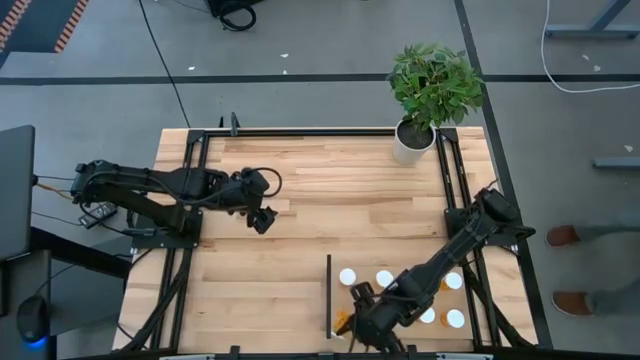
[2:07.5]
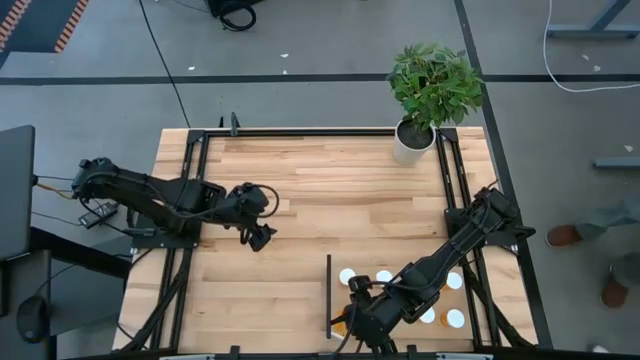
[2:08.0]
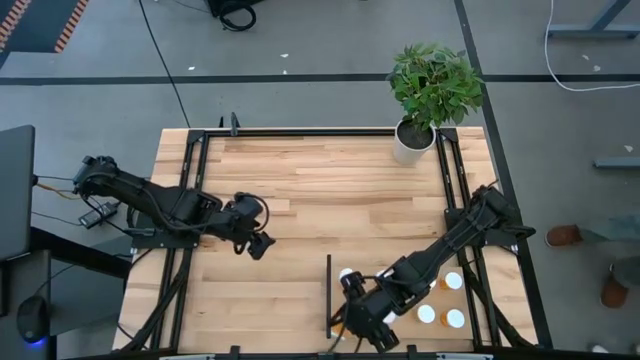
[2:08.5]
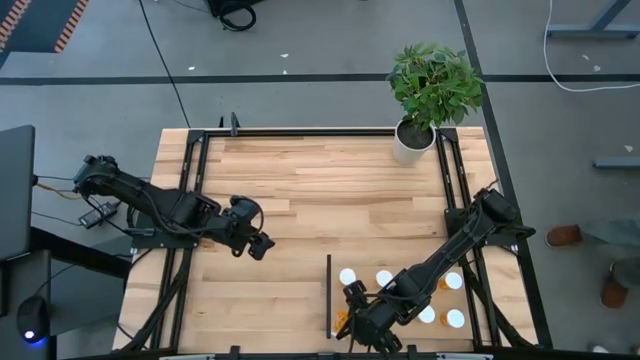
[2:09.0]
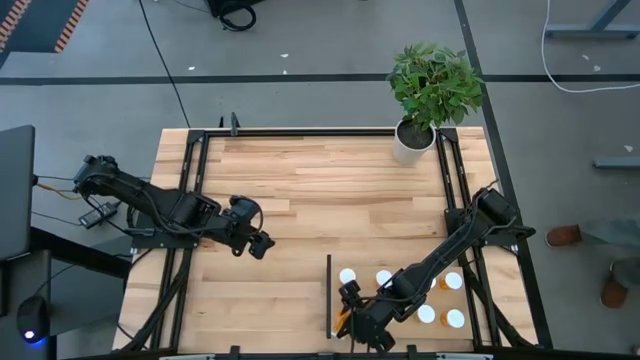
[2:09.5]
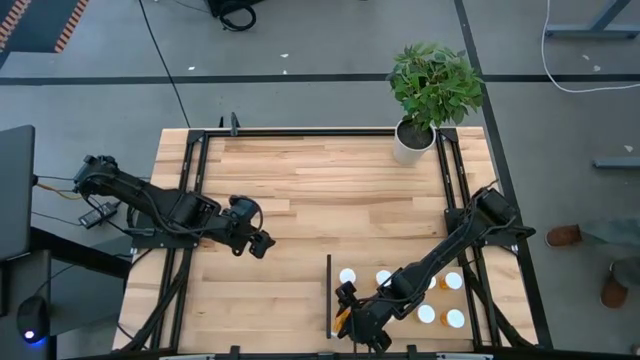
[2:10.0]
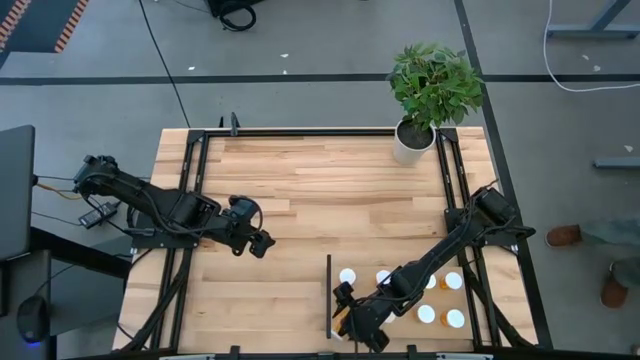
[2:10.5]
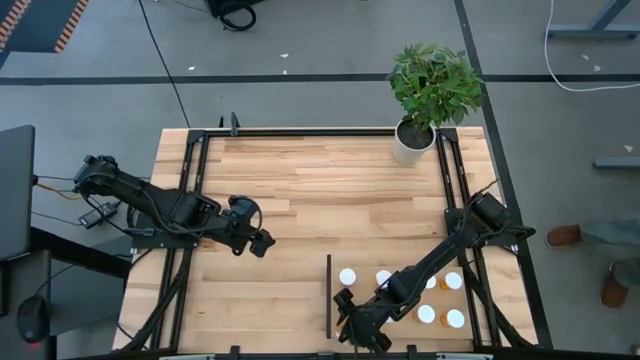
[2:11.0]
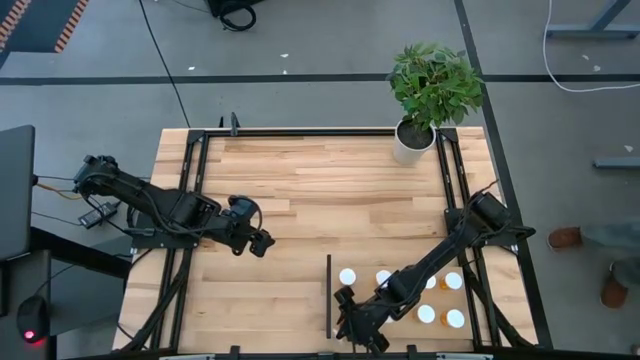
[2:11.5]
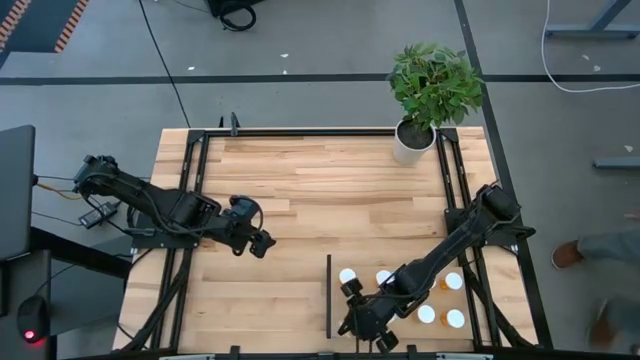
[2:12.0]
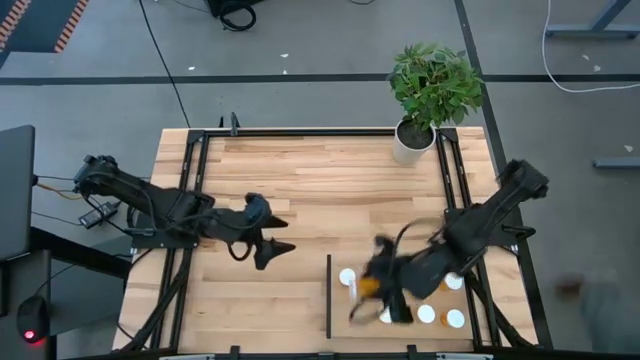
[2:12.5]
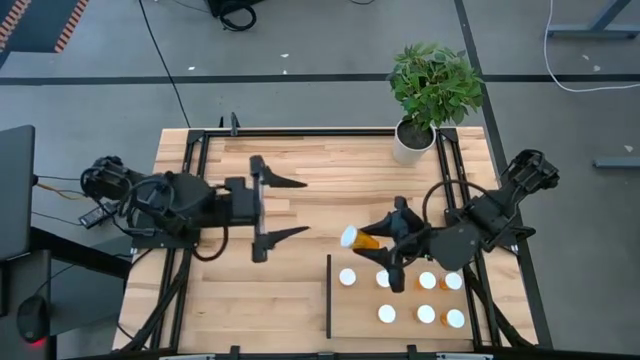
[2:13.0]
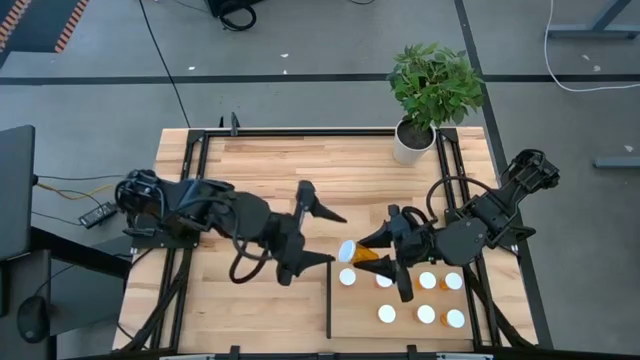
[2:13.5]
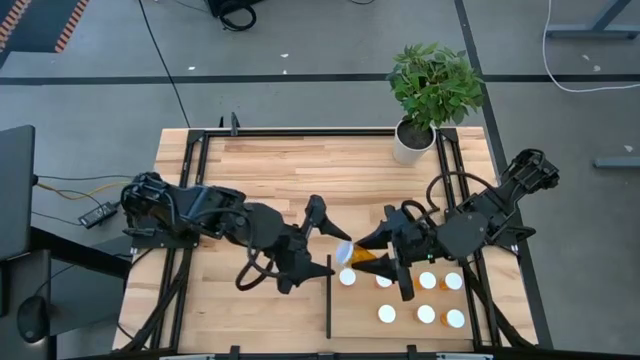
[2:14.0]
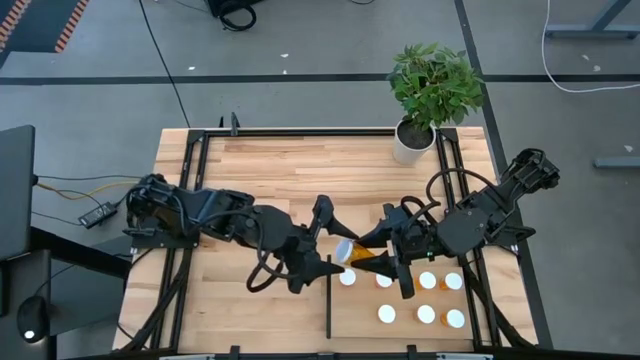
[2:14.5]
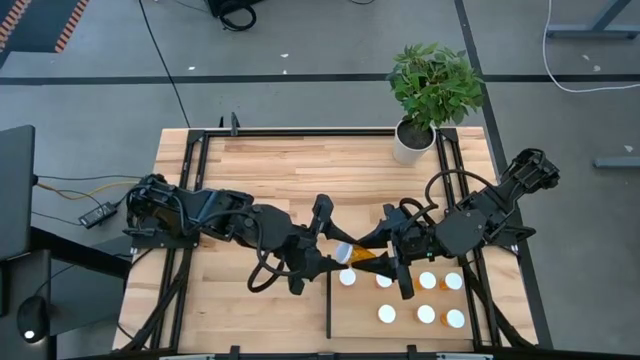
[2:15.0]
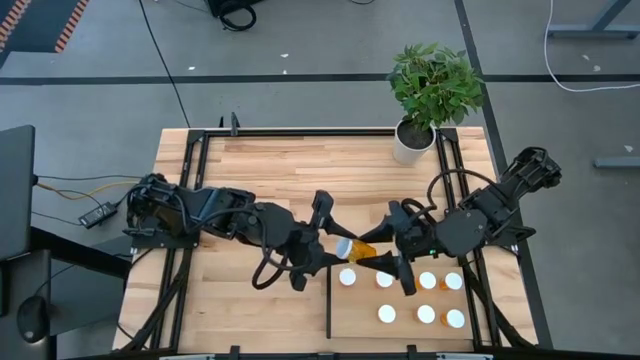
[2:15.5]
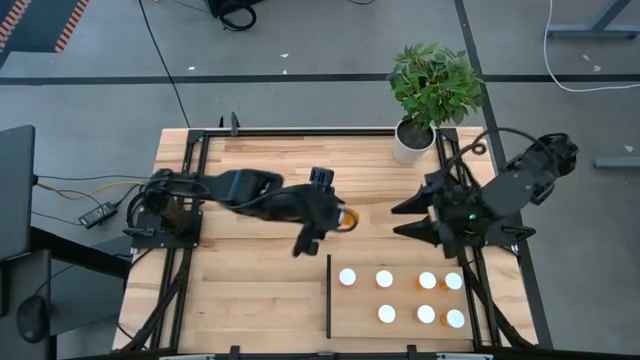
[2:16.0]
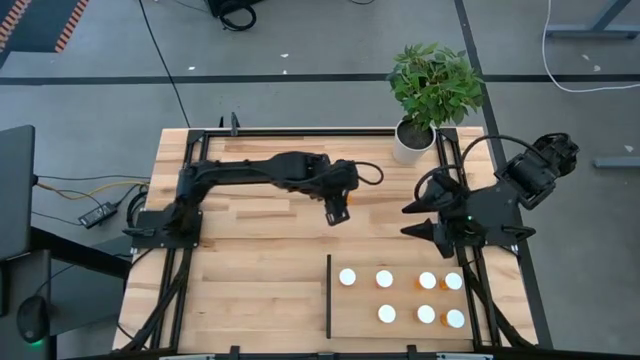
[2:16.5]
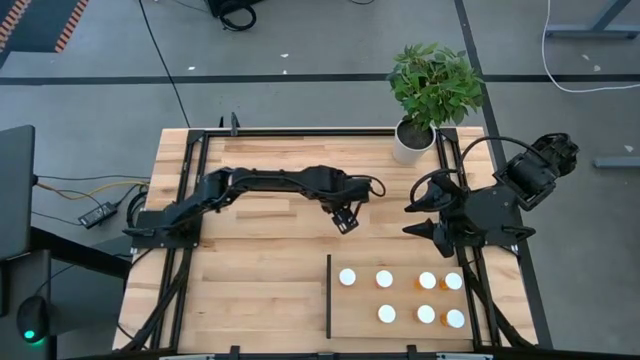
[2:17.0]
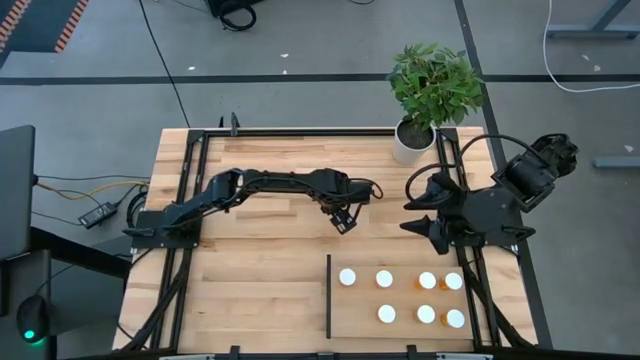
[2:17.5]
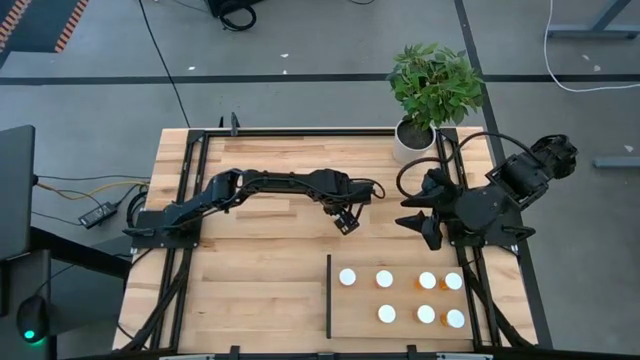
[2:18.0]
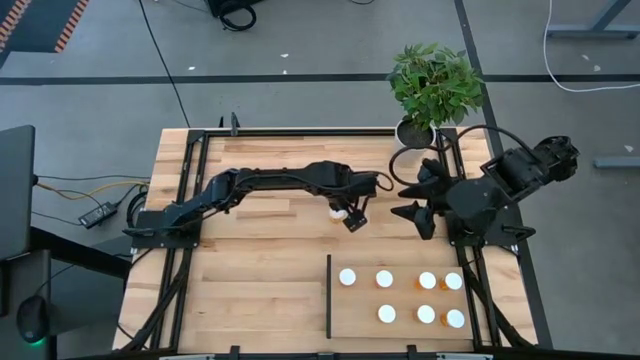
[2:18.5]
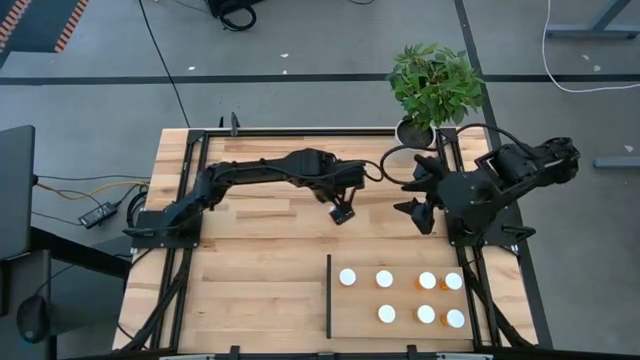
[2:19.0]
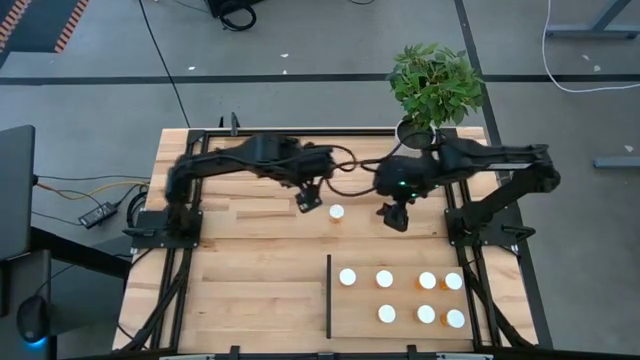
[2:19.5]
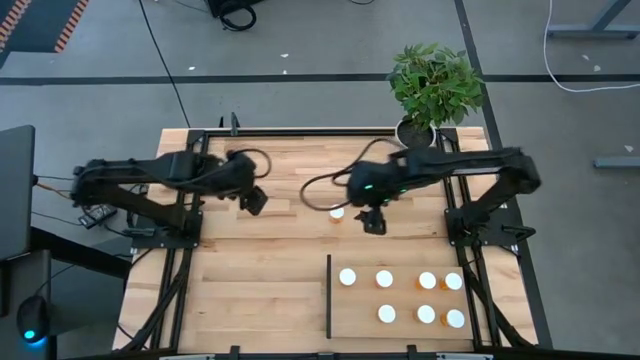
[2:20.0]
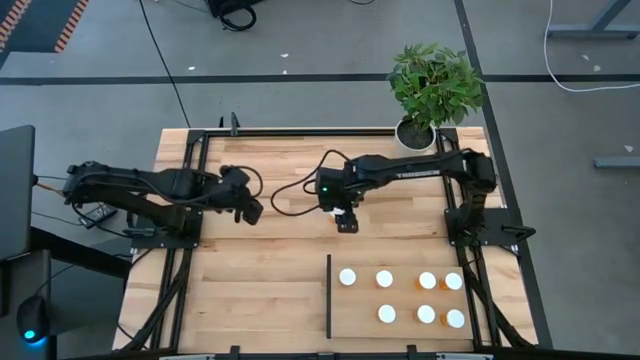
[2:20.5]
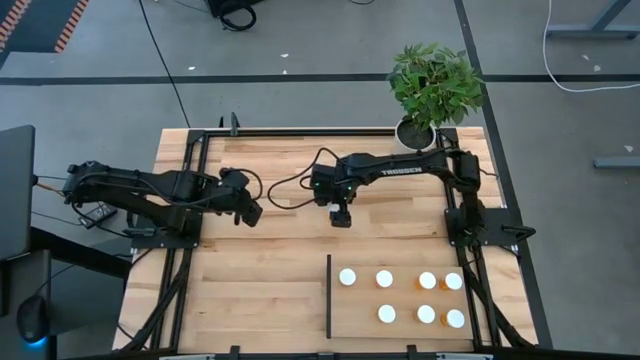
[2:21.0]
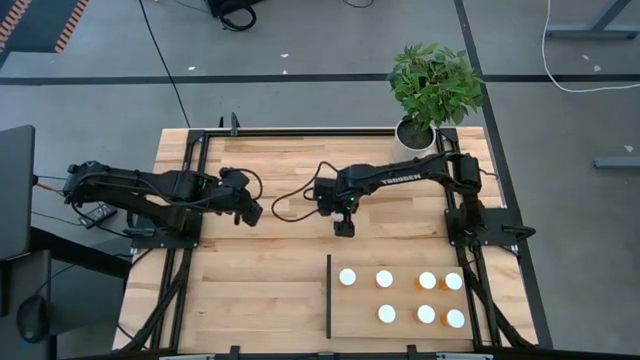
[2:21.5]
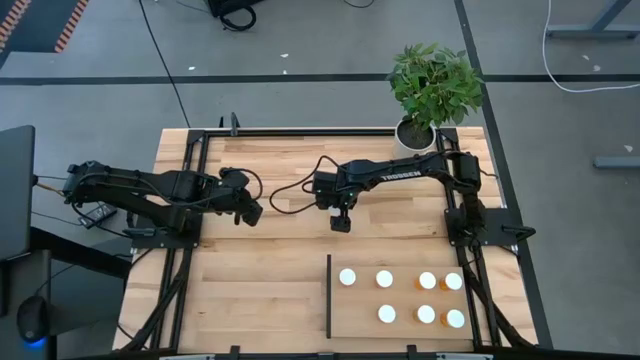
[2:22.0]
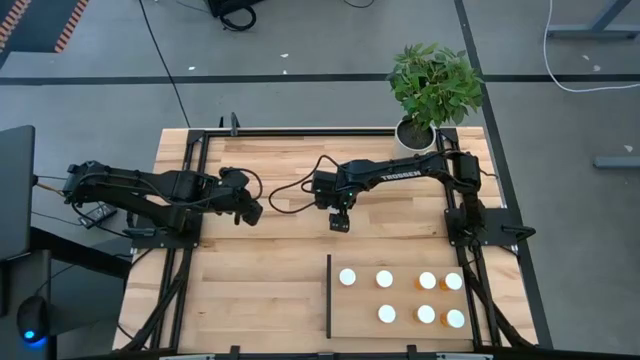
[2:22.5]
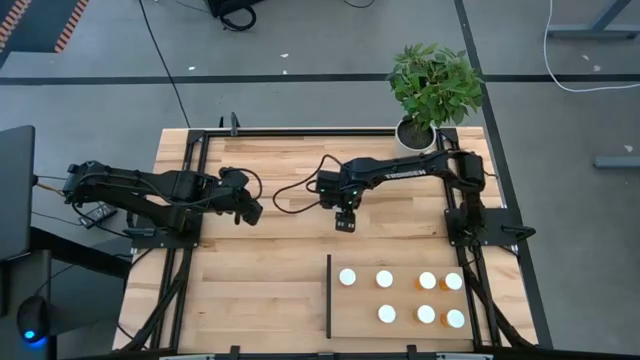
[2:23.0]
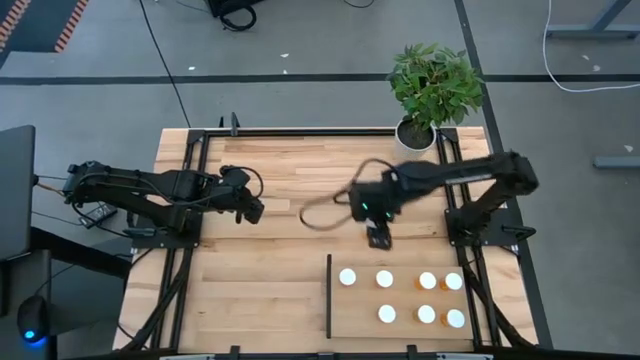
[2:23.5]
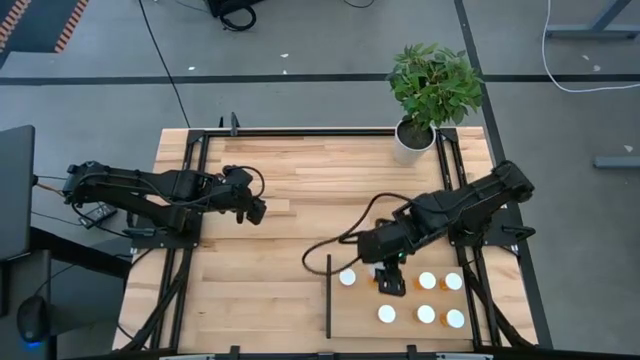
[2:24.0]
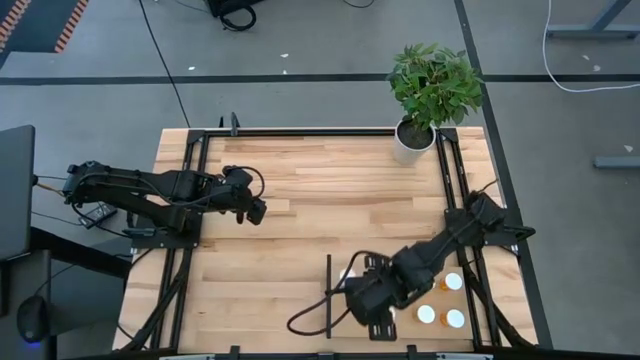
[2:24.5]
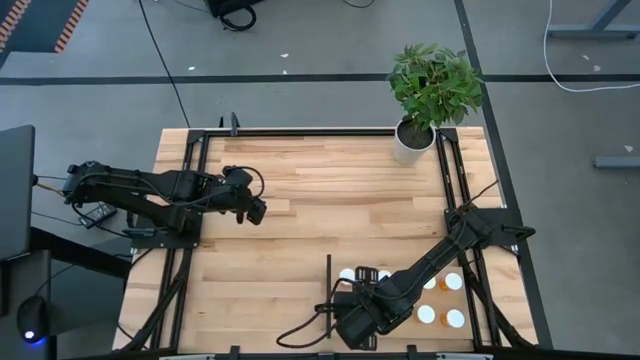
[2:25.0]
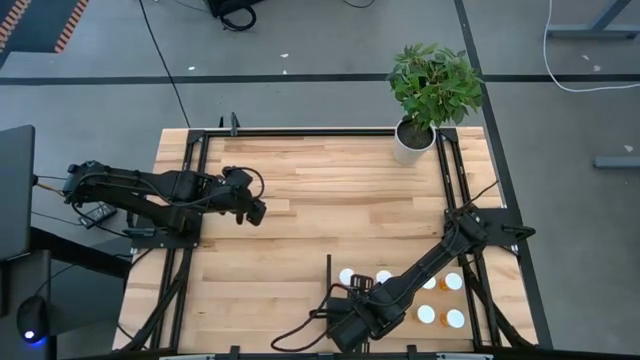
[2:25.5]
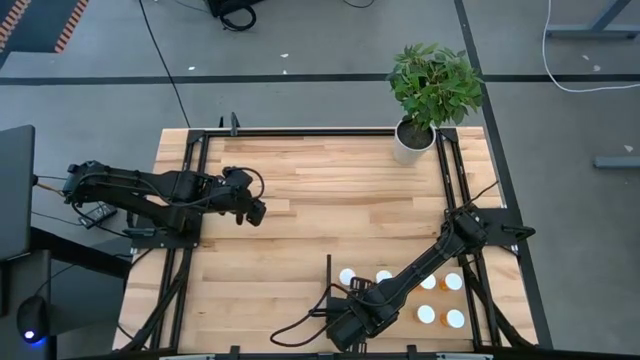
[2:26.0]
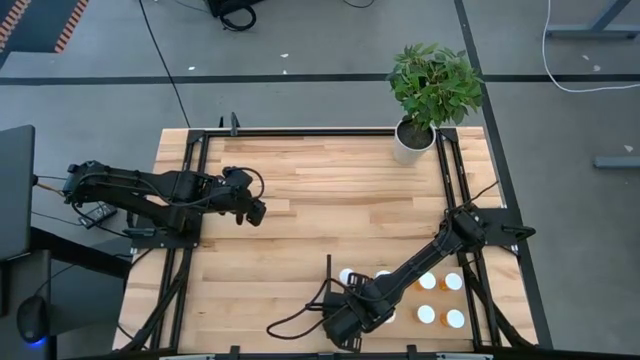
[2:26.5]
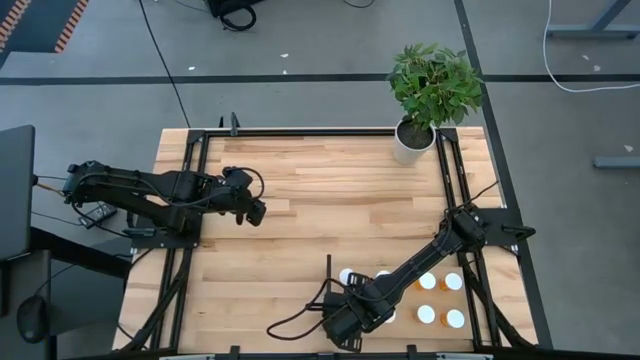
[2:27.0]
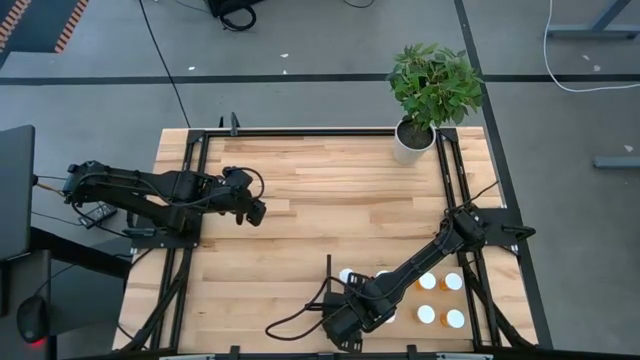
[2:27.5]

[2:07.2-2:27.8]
Task: Pick and place medicine bottles onto shelf by color
Put the orange pill bottle on the shelf aligned with the other orange pill bottles

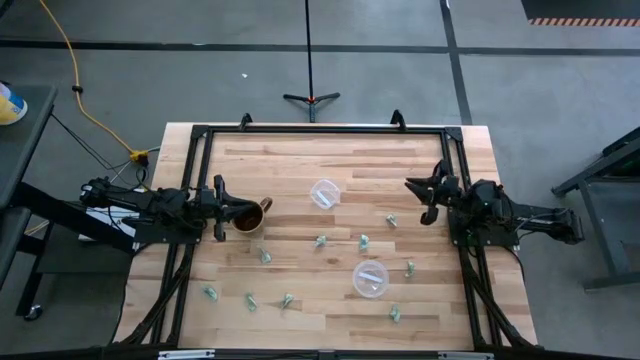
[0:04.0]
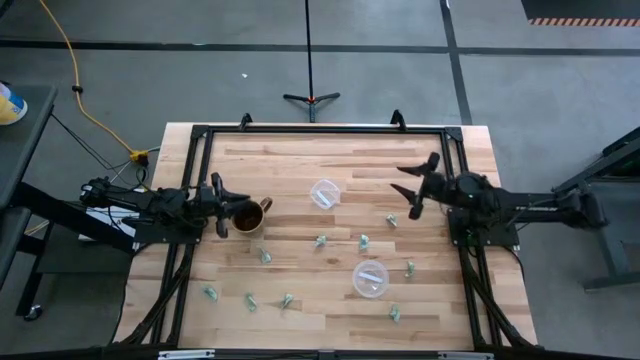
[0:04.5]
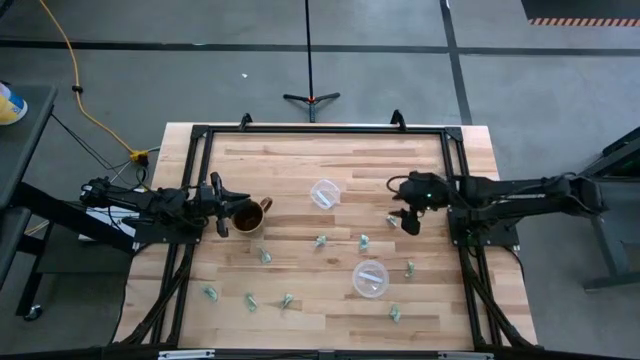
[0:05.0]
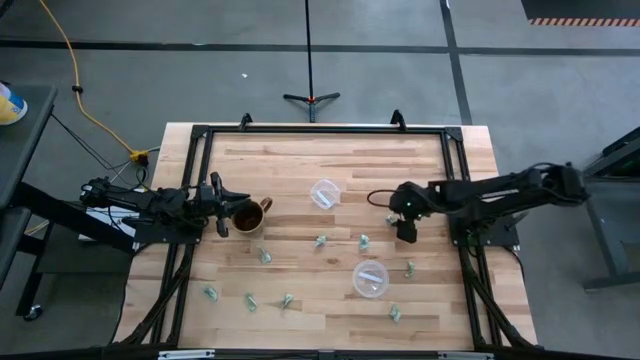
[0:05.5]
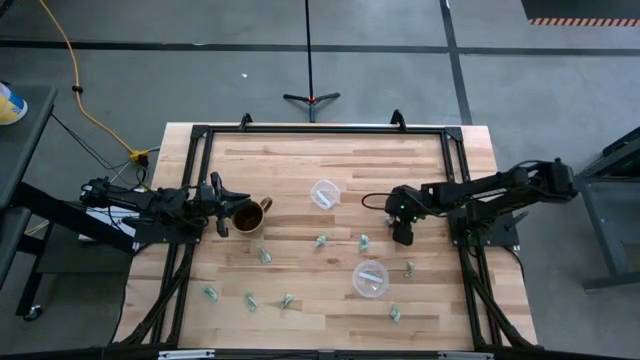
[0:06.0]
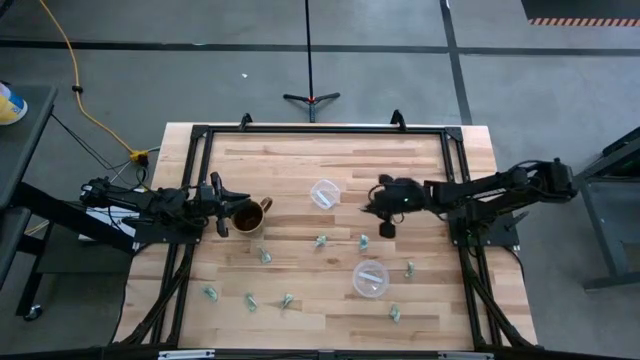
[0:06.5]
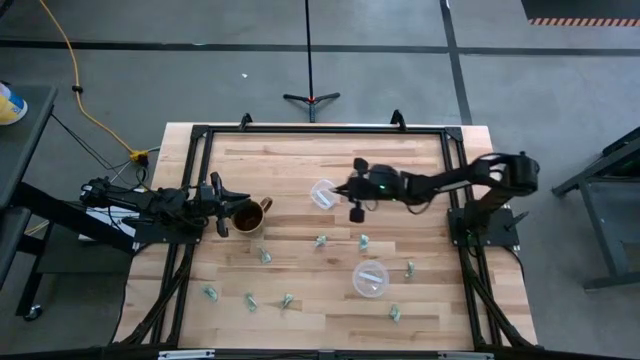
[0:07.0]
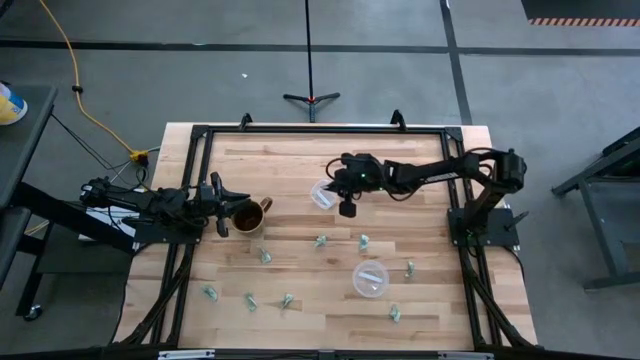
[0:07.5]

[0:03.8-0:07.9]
Task: Pick and place Stevia / Truvia into bins
Put the stevia packet into the top transparent container
